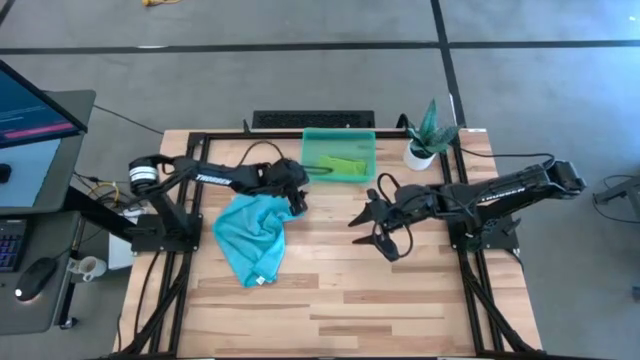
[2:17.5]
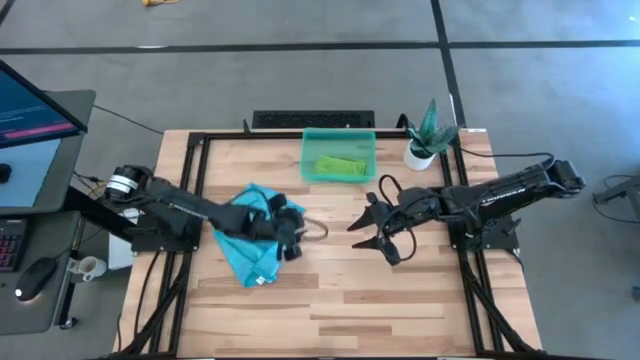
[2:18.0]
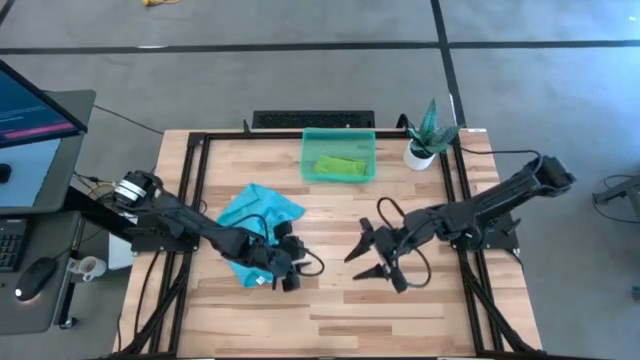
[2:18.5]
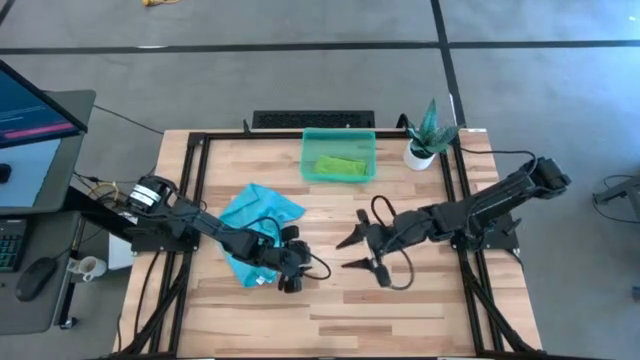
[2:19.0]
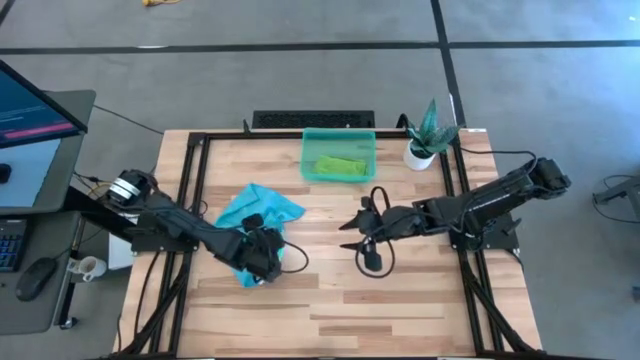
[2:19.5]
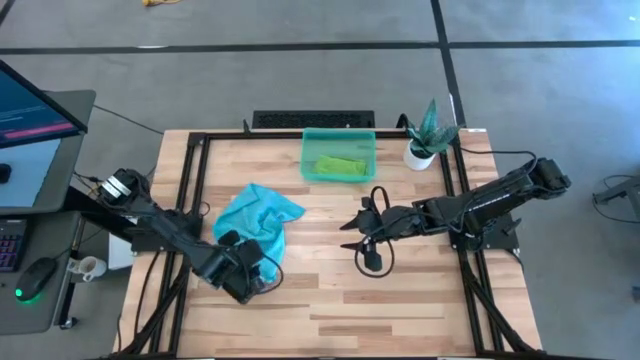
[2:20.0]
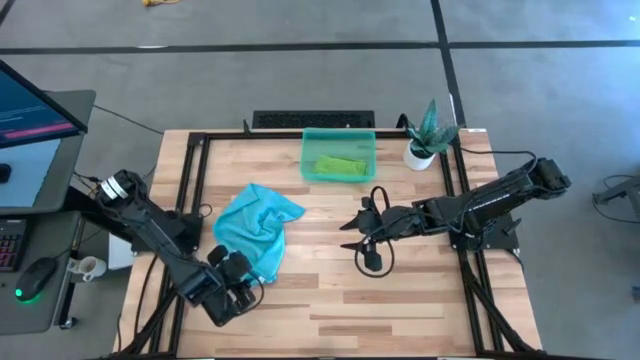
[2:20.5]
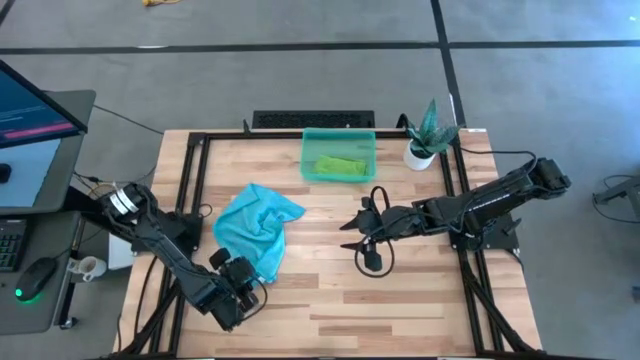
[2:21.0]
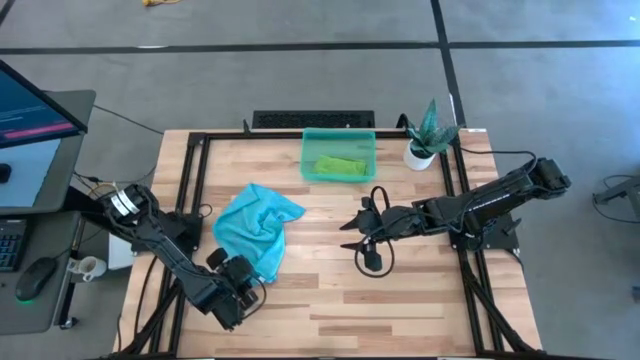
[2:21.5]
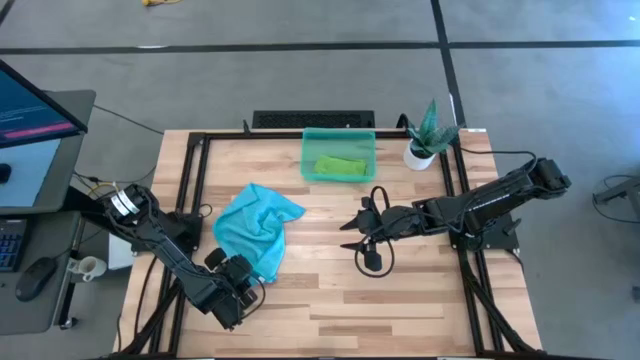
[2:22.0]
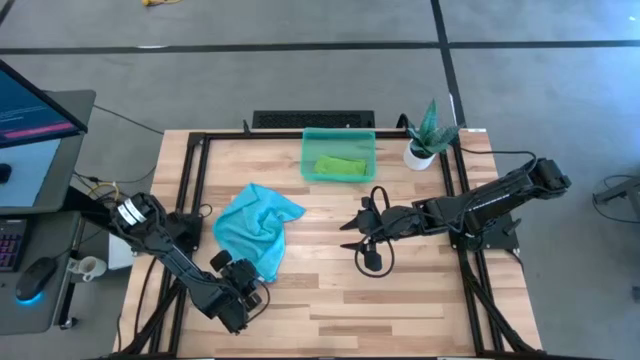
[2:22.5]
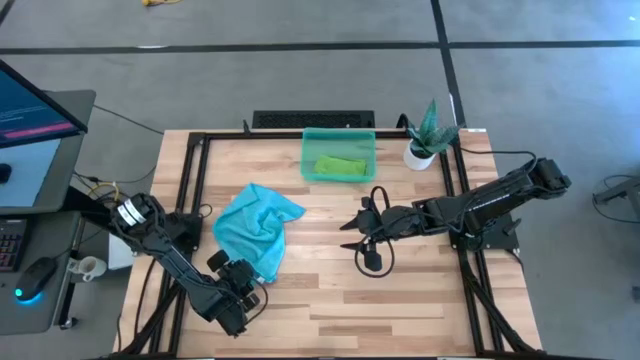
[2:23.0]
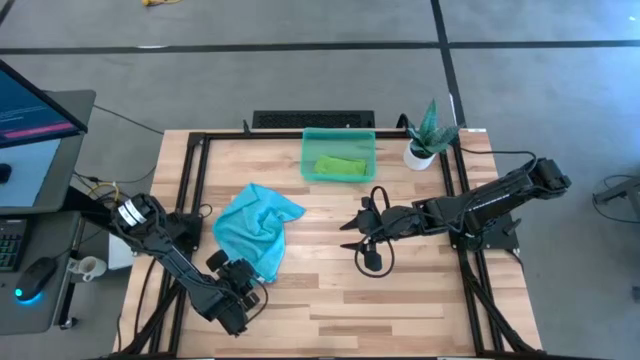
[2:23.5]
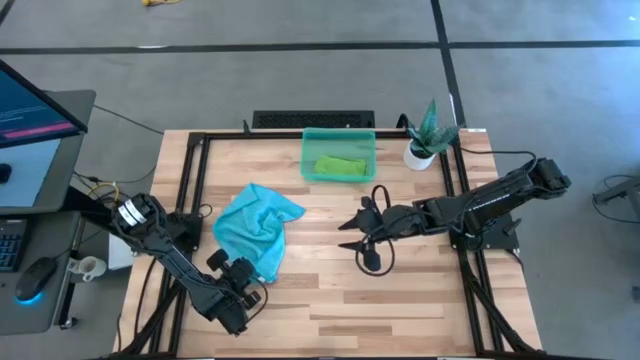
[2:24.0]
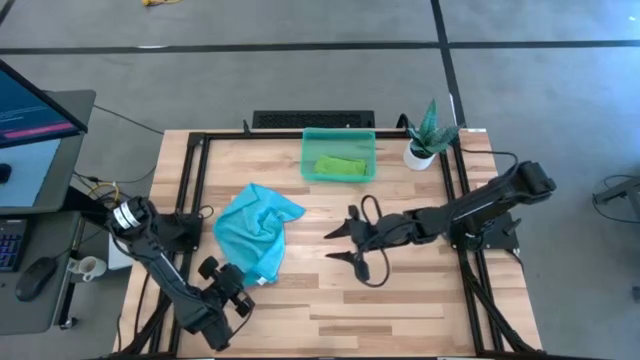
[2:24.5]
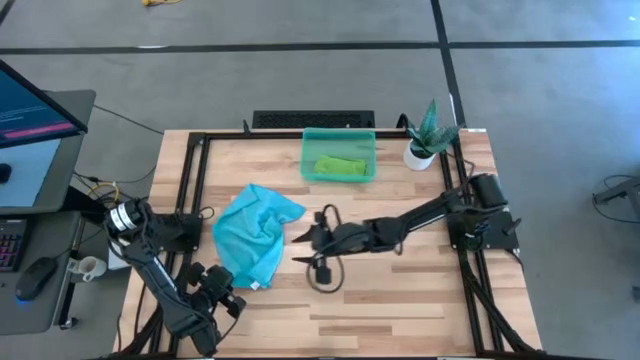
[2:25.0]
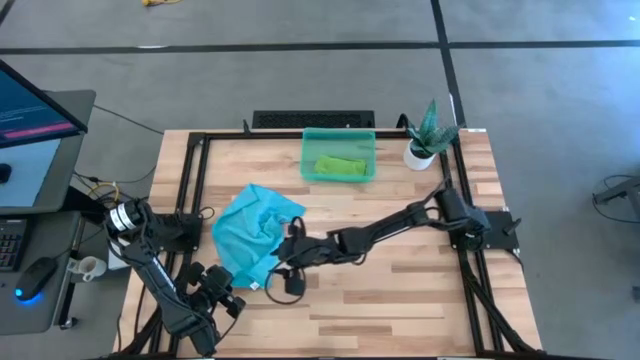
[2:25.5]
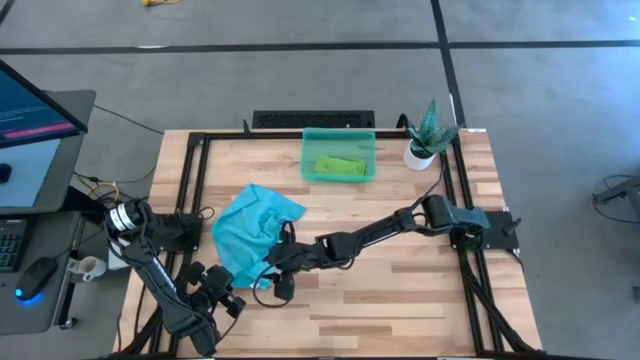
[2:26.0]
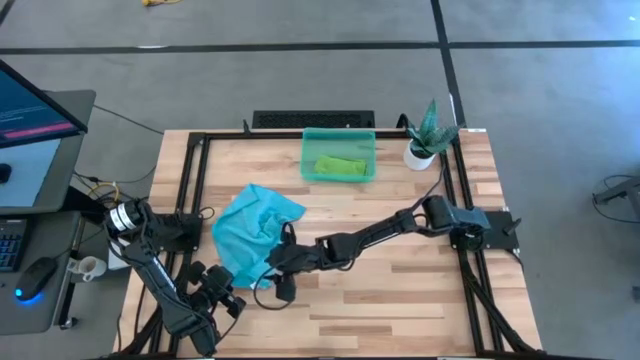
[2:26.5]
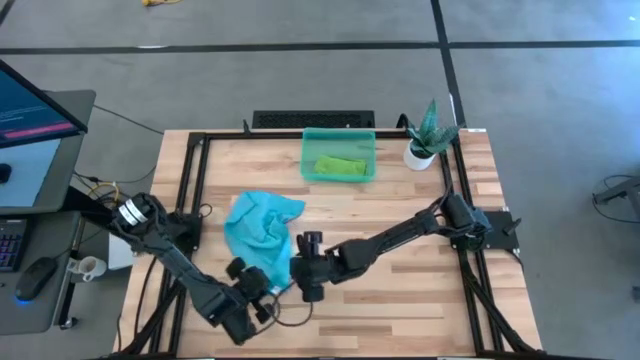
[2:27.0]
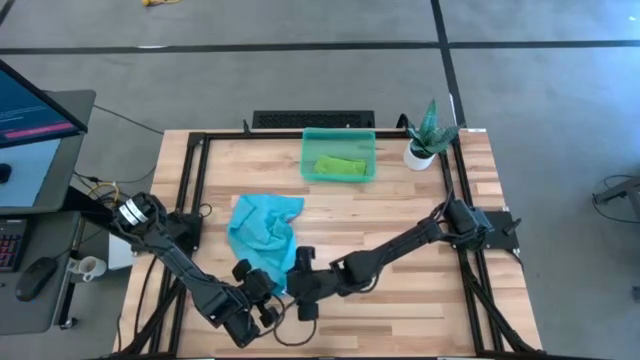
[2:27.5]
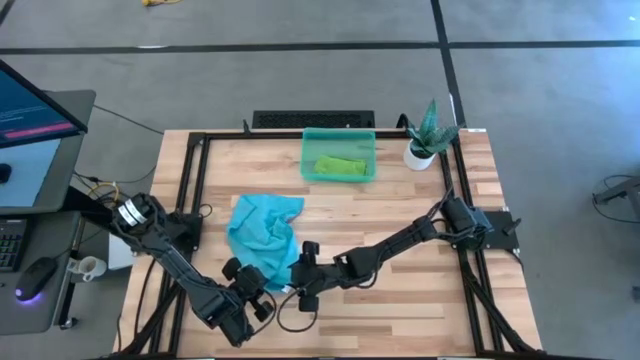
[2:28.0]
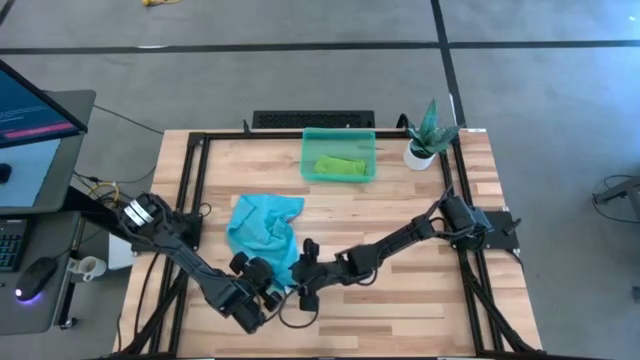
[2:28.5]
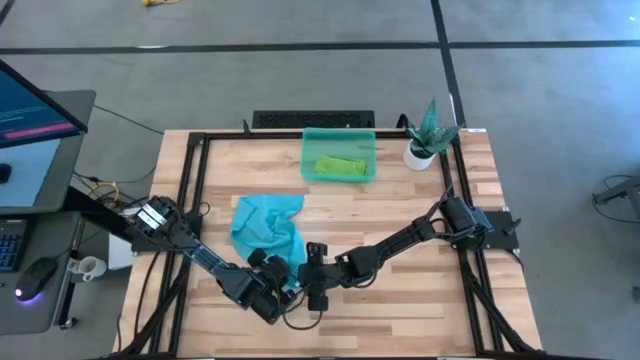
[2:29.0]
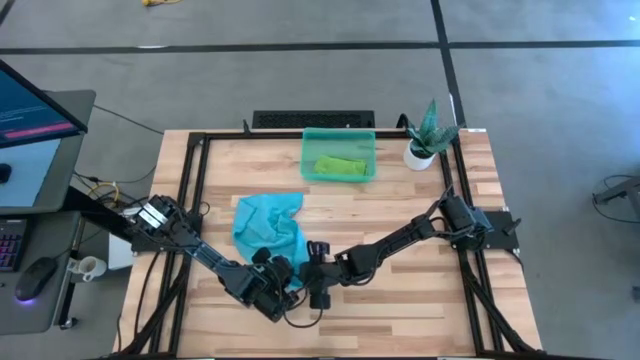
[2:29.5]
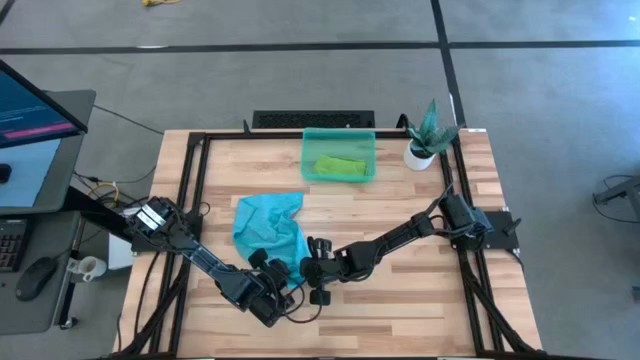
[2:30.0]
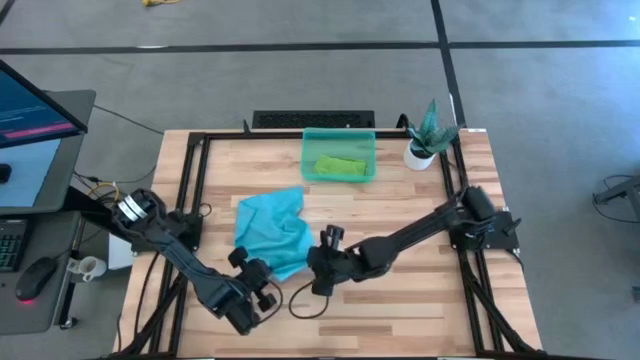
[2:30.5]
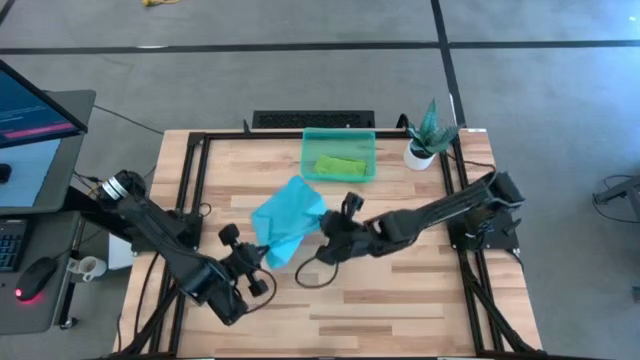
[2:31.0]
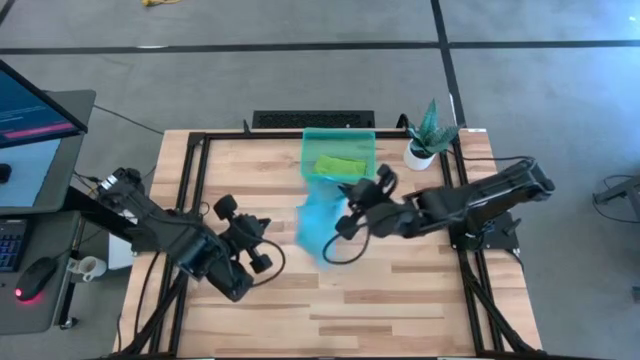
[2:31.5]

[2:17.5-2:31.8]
Task: Roll microfiber towels into tight, uniform cylinder then place into a basket
Fold the blue microfiber cloth

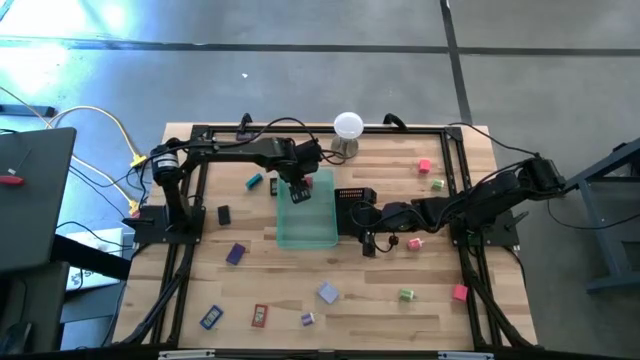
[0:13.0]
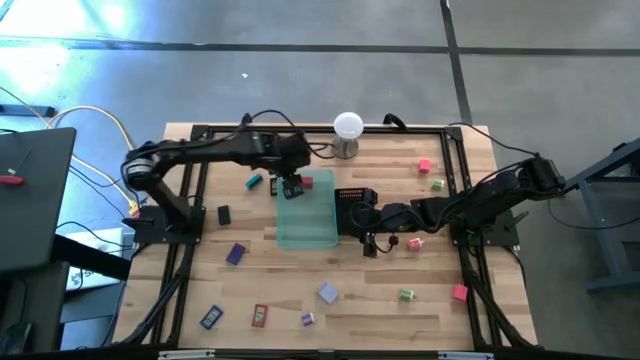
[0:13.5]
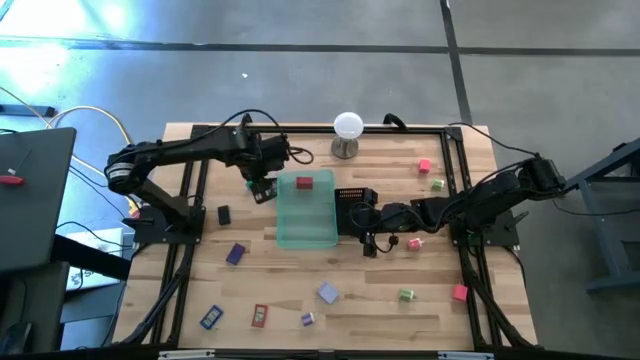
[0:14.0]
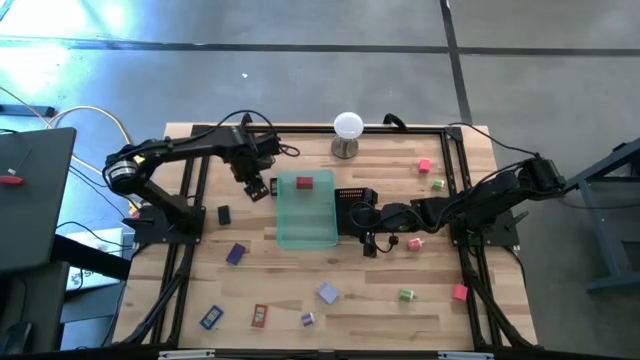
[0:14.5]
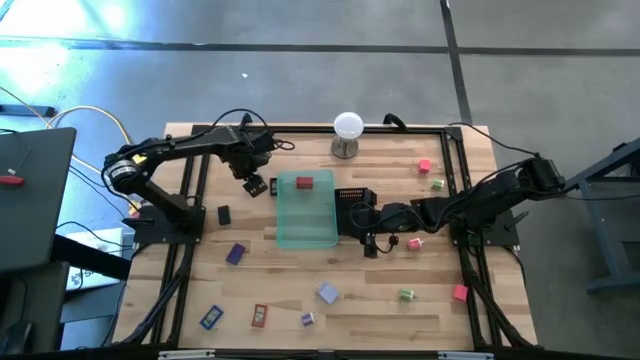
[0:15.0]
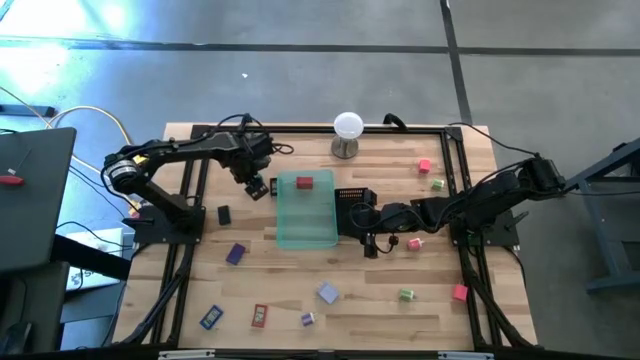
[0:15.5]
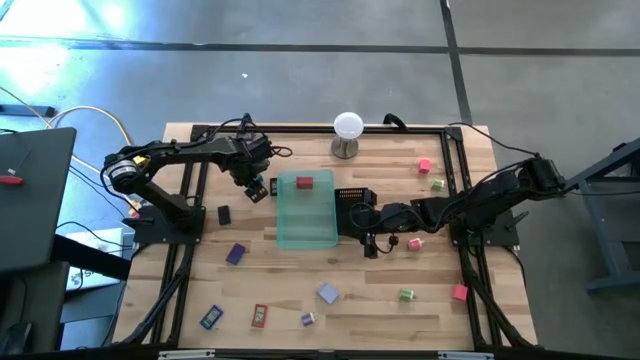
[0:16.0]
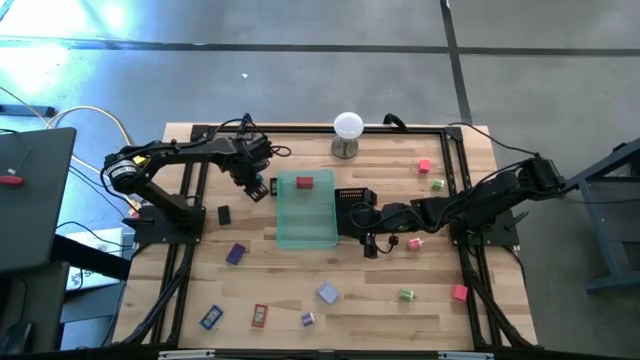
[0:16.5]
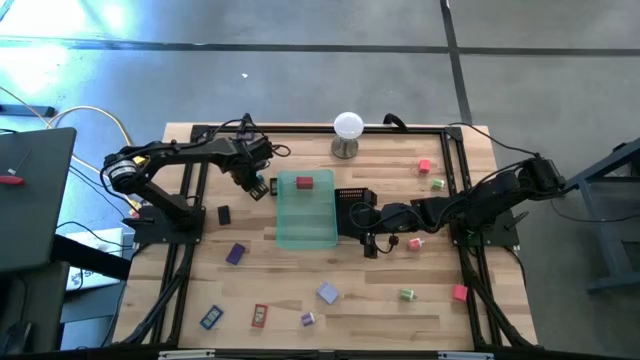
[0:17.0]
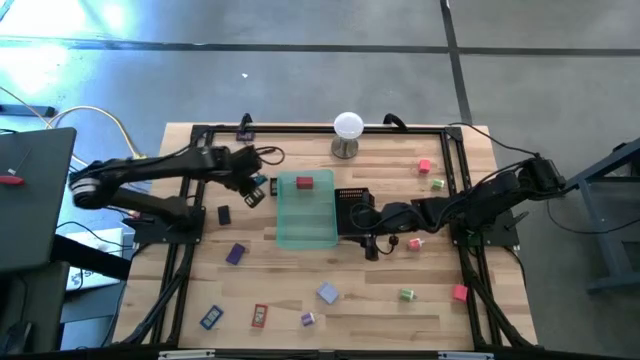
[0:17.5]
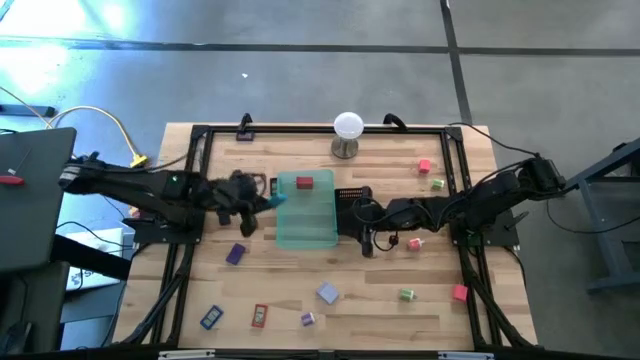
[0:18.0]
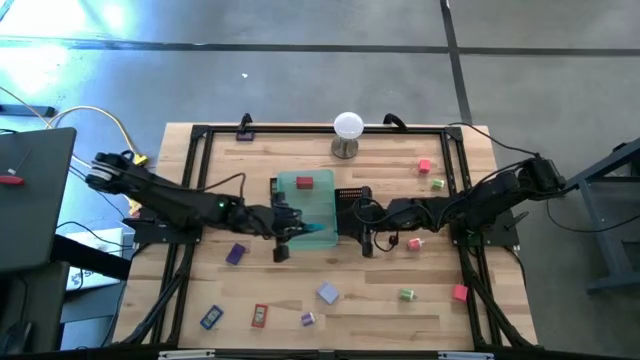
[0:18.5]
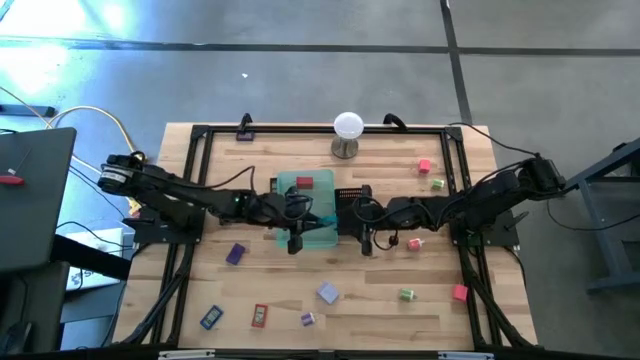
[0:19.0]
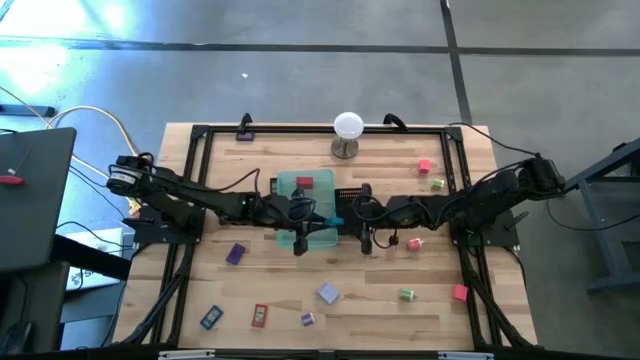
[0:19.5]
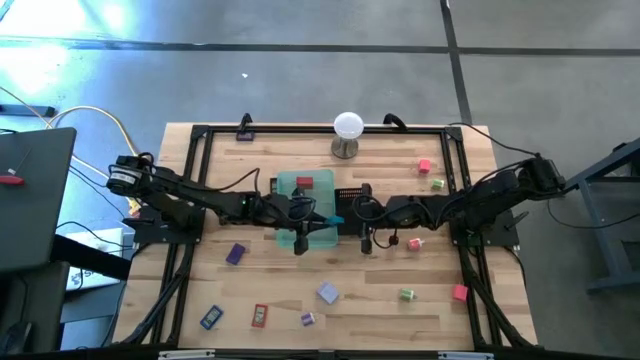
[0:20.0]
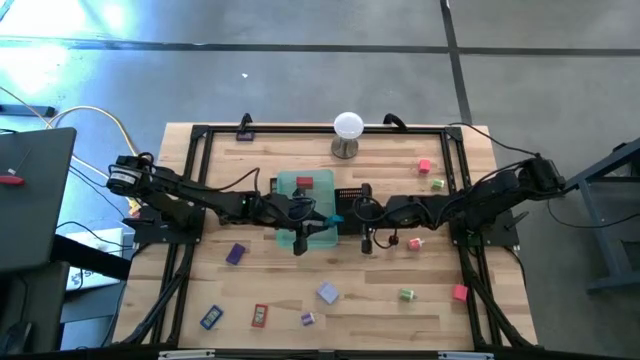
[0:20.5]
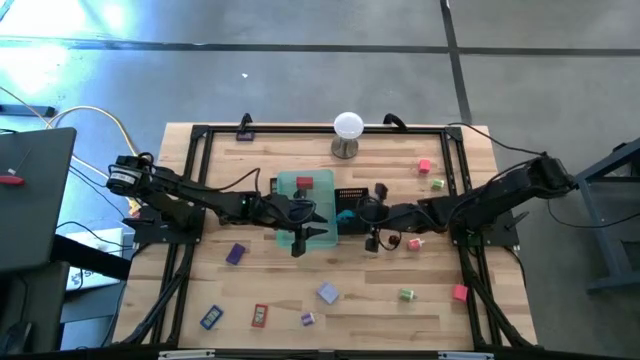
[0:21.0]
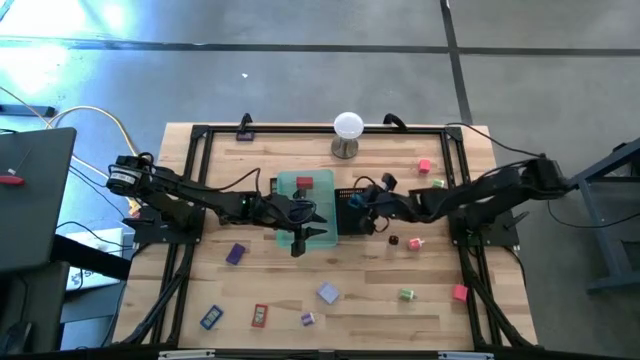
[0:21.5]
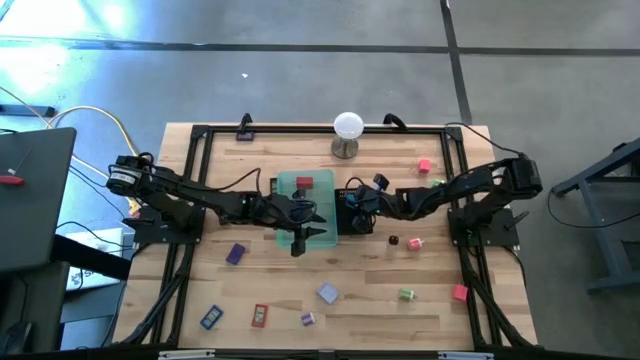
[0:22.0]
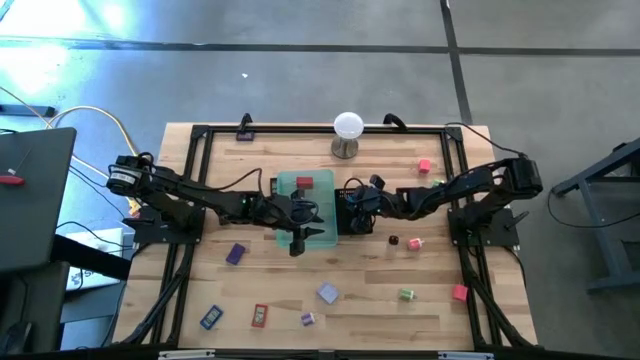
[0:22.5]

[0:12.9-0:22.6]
Task: Pick & Place Office items
Put the light blue digital clock into the black bin
